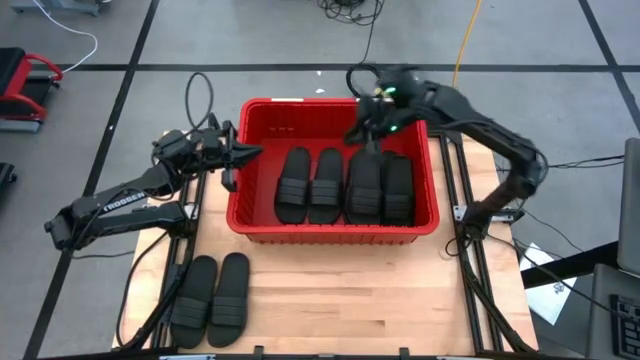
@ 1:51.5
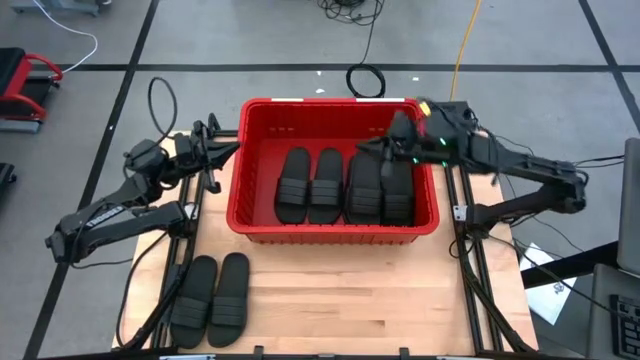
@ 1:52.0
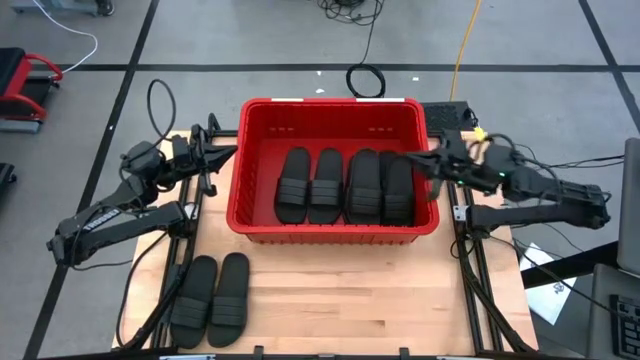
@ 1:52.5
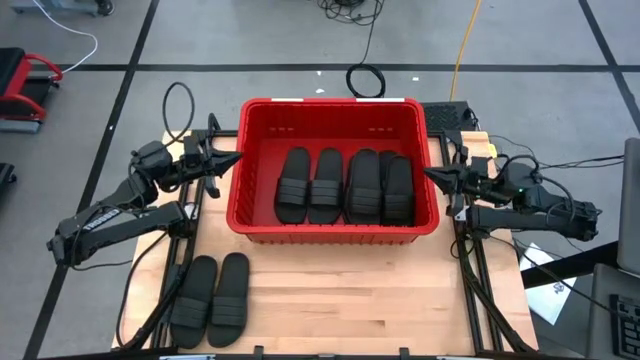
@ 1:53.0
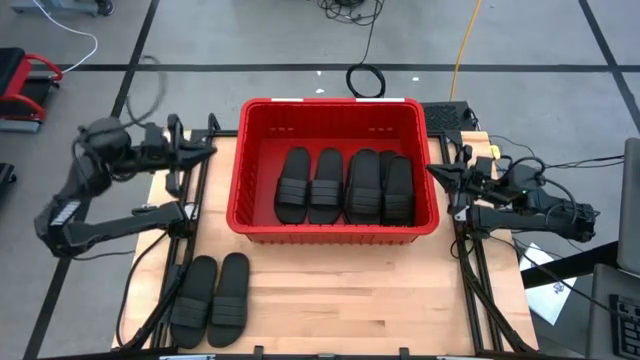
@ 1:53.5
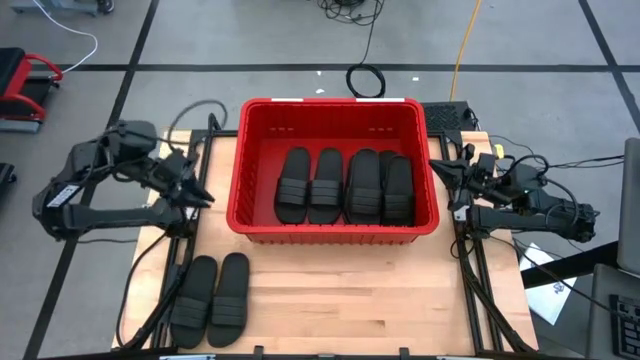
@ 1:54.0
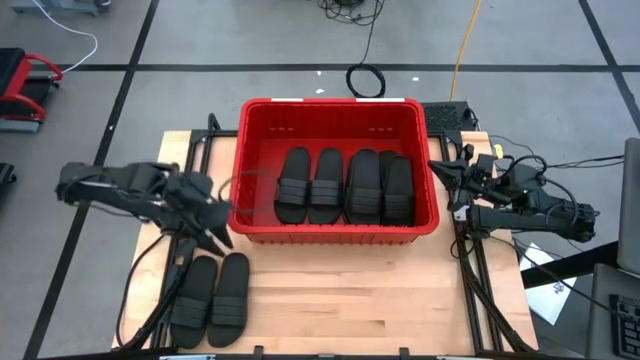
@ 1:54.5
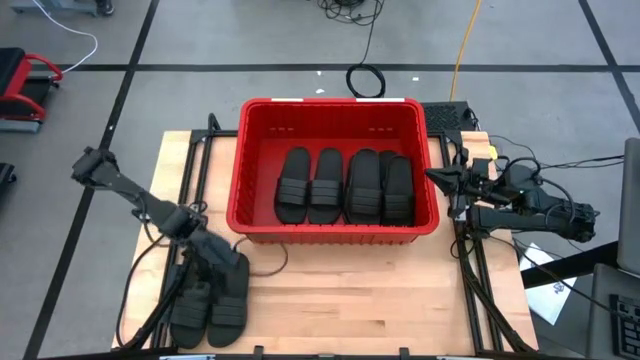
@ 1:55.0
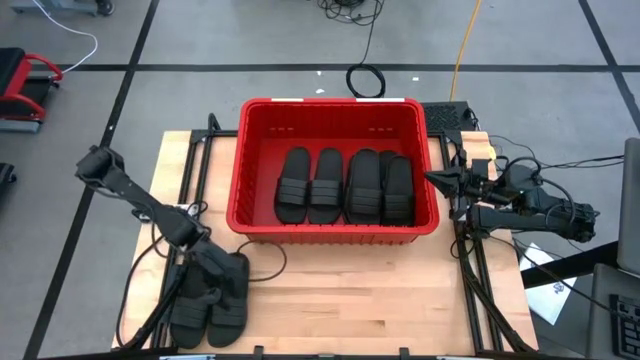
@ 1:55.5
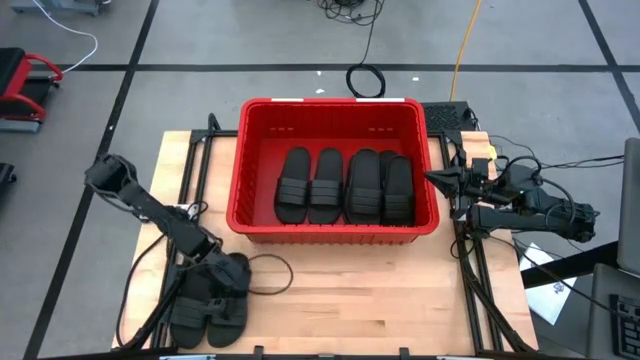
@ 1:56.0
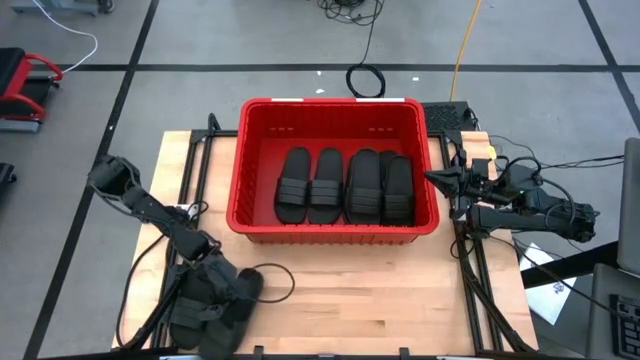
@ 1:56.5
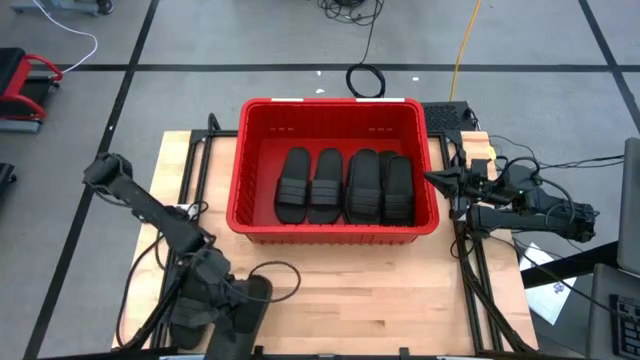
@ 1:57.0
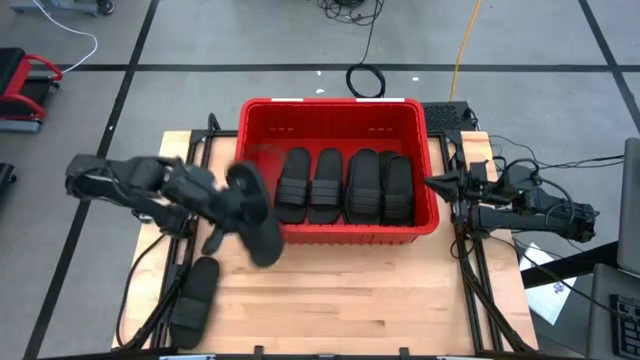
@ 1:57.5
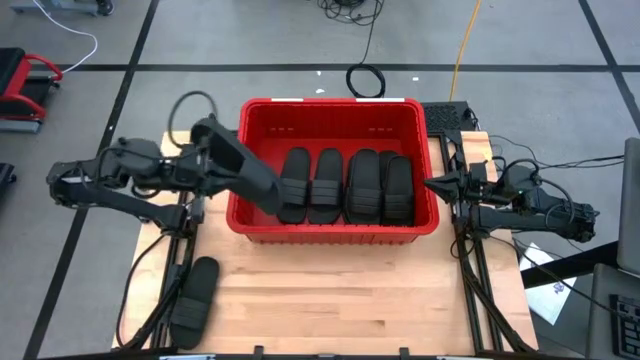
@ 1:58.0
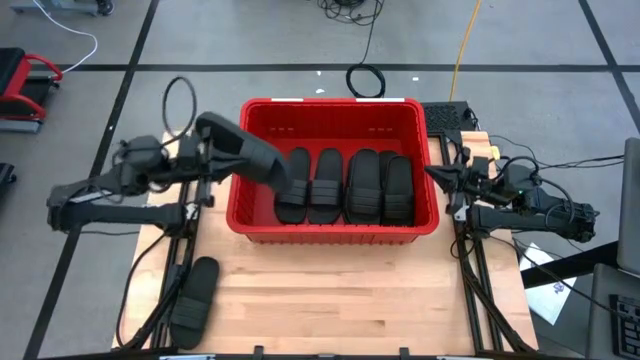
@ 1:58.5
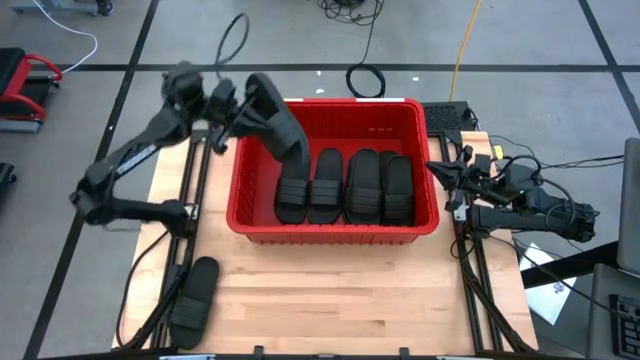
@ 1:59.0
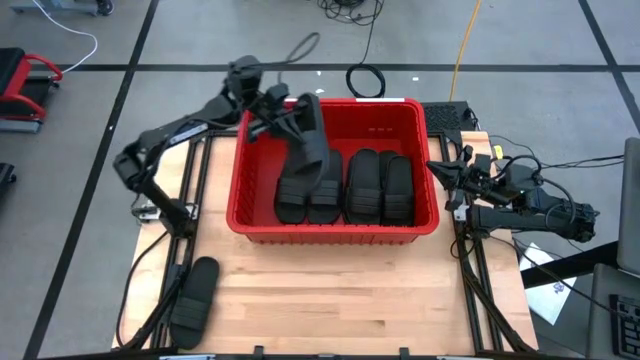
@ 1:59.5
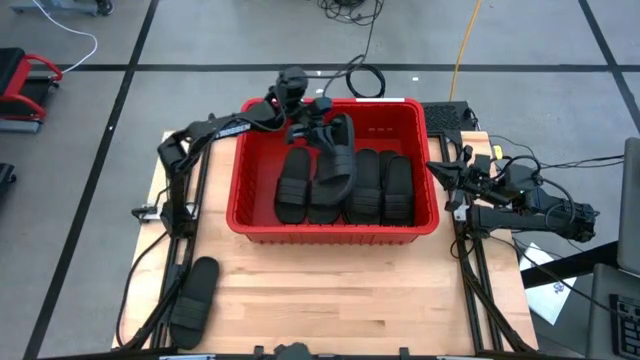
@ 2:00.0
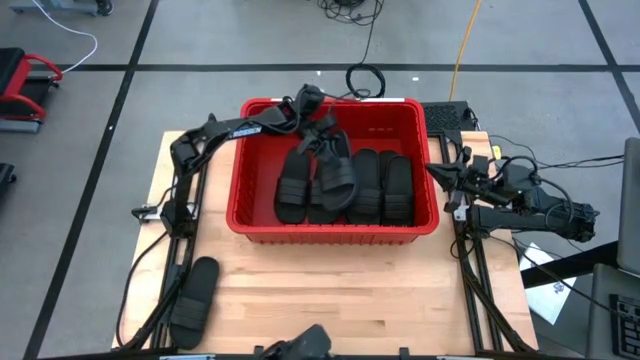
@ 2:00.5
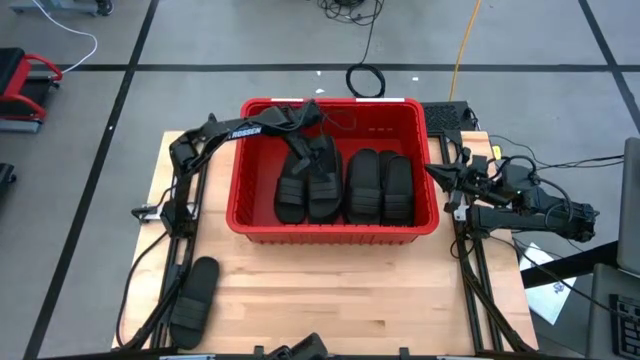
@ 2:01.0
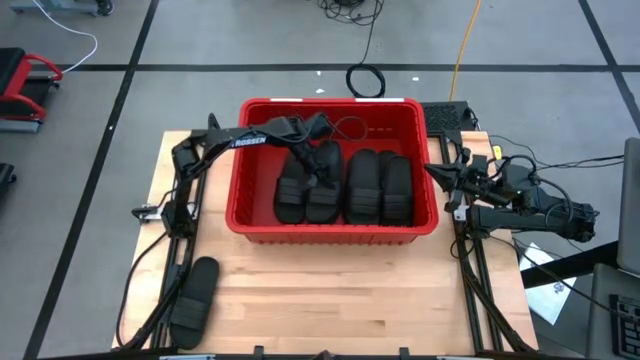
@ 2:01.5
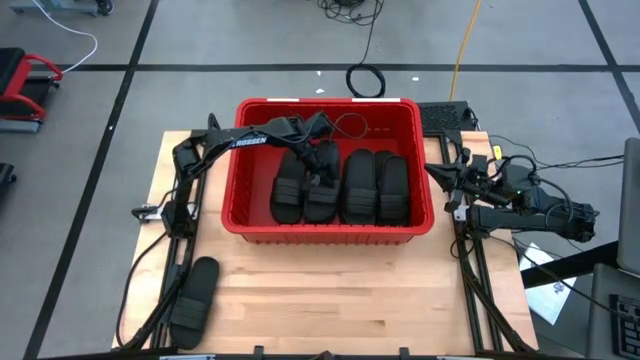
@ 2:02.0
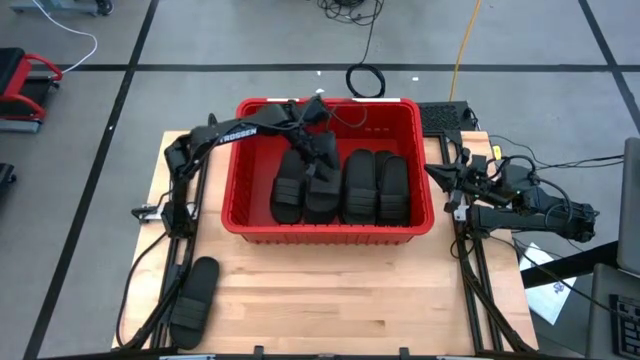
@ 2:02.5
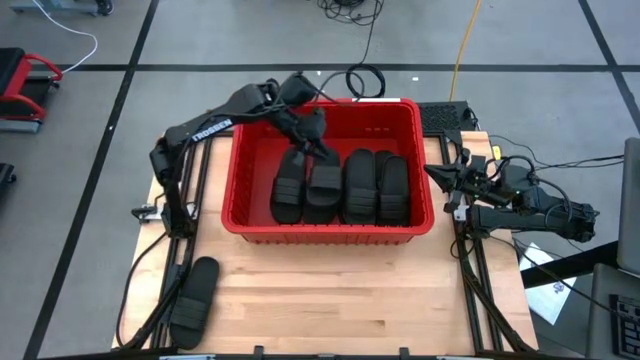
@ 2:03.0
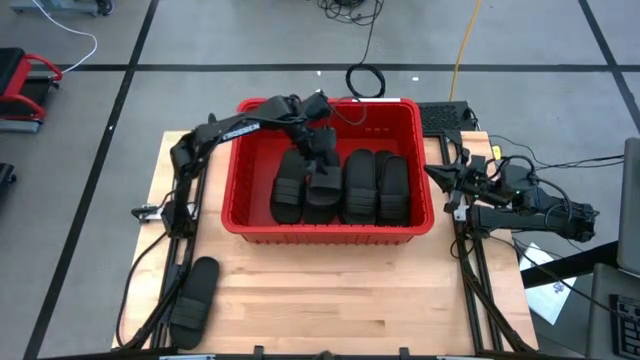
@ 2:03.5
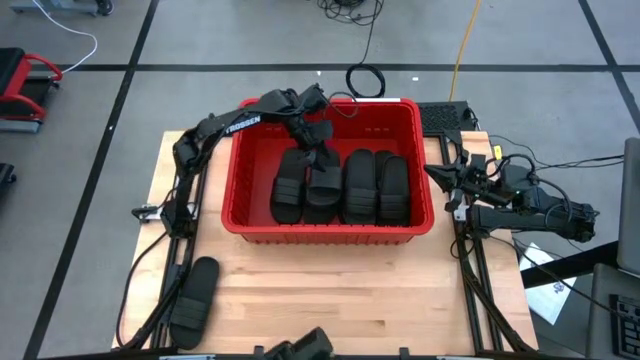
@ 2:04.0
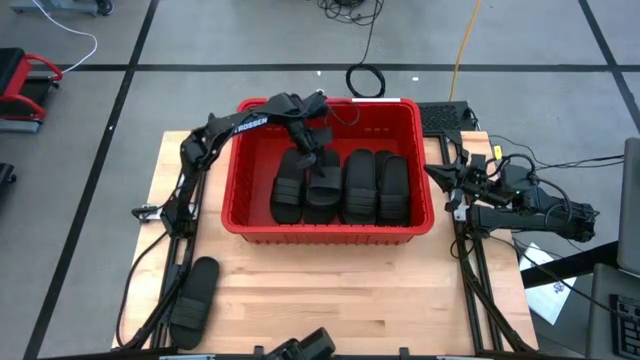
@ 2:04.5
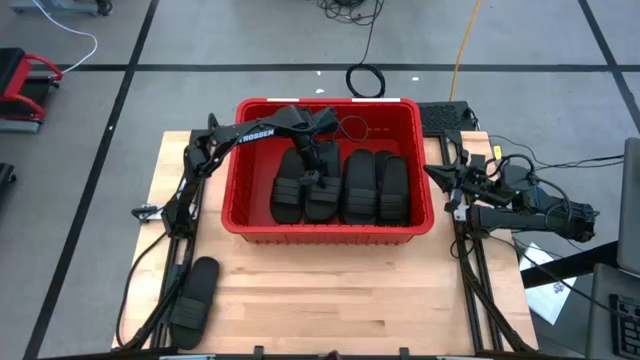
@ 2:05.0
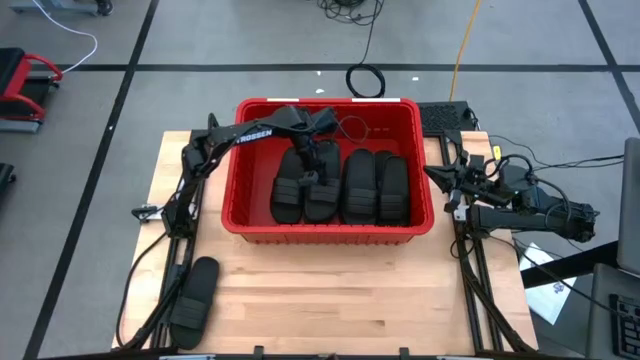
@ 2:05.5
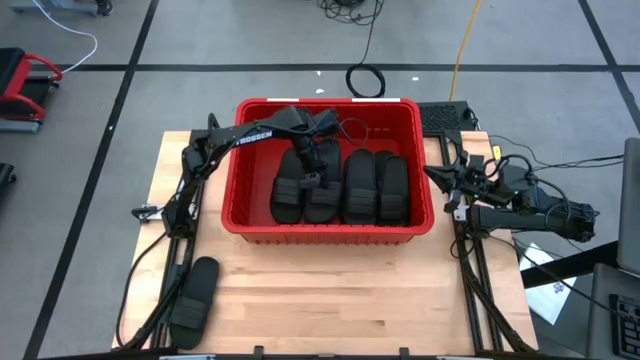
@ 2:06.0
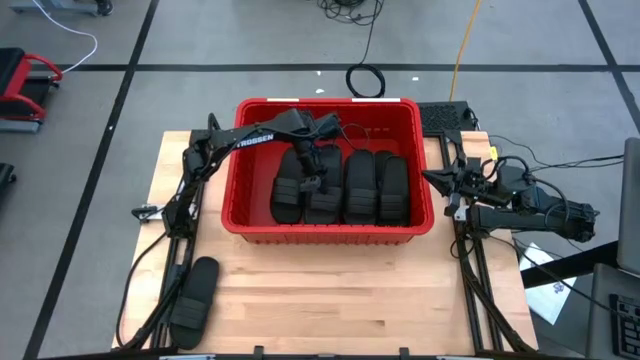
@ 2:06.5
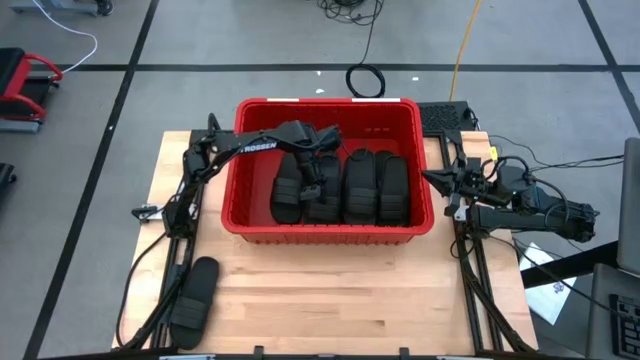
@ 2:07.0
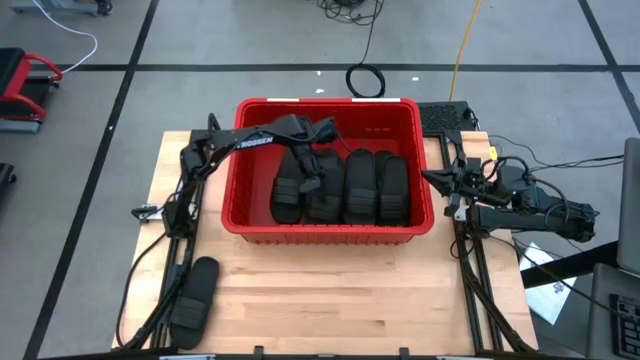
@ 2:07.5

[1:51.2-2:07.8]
Task: Pick and place slides into bin
Put the black slide into the red bin
